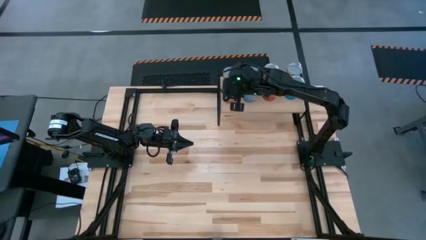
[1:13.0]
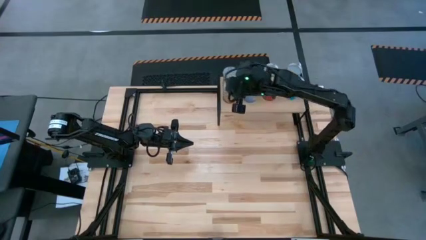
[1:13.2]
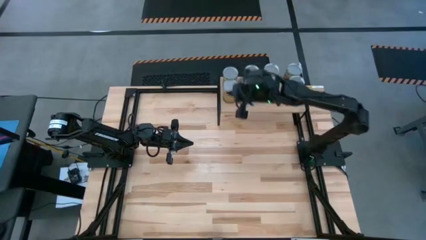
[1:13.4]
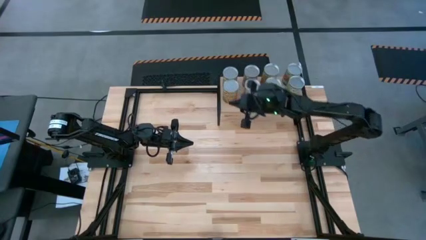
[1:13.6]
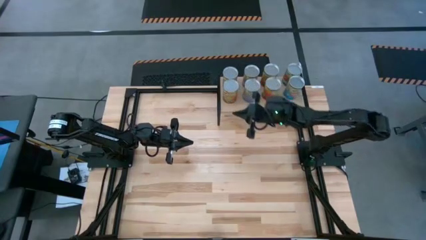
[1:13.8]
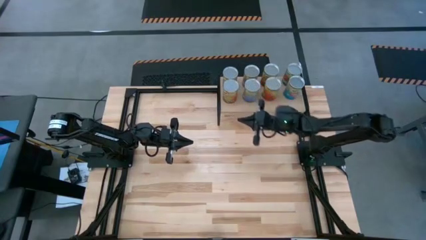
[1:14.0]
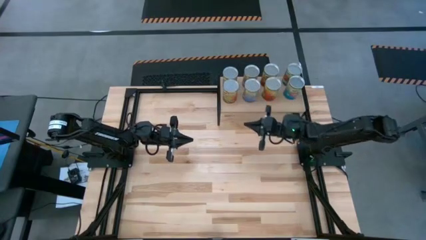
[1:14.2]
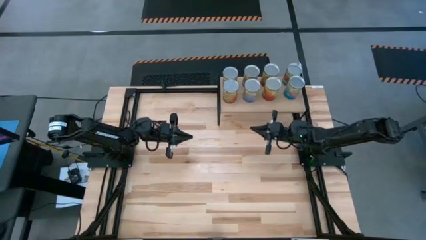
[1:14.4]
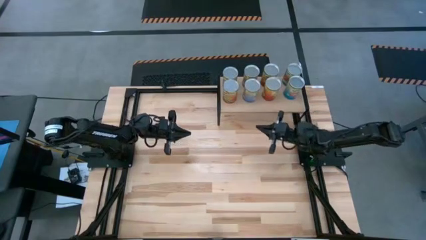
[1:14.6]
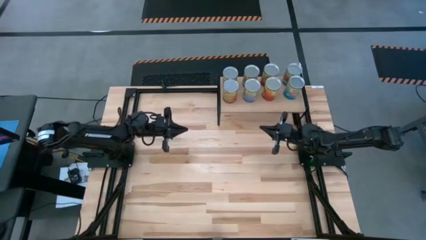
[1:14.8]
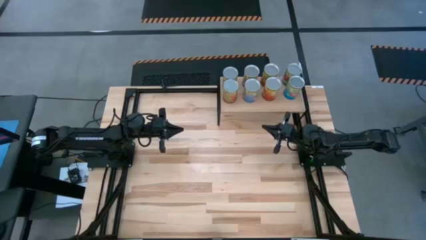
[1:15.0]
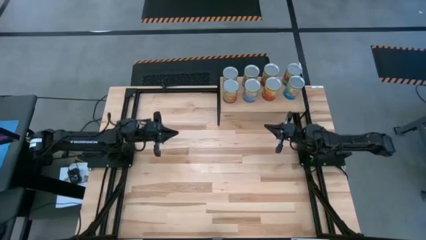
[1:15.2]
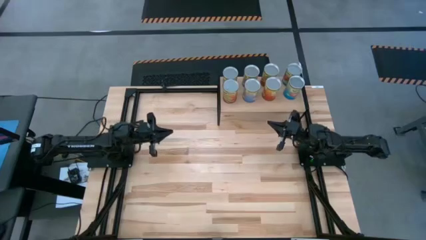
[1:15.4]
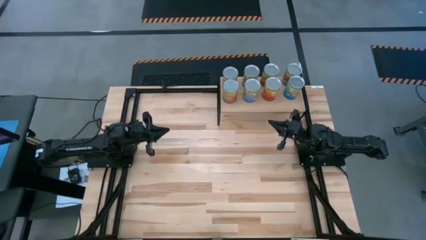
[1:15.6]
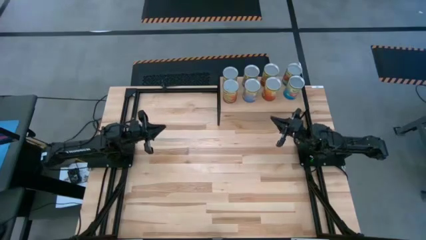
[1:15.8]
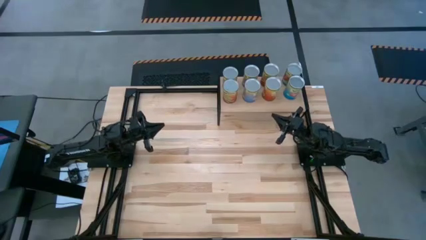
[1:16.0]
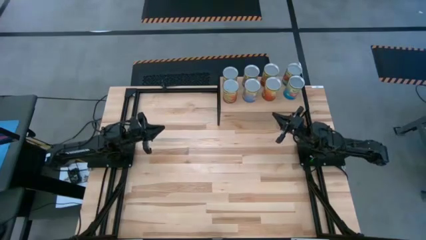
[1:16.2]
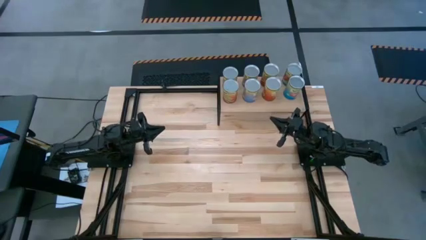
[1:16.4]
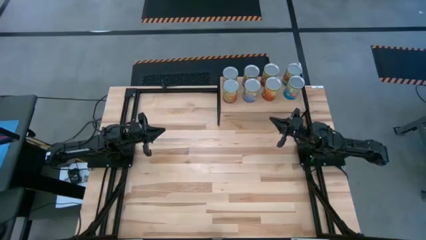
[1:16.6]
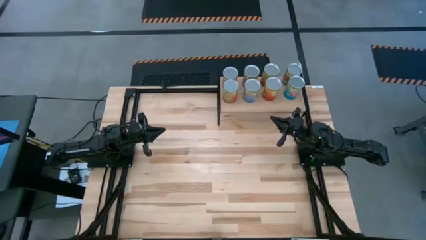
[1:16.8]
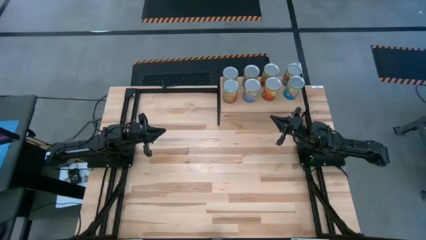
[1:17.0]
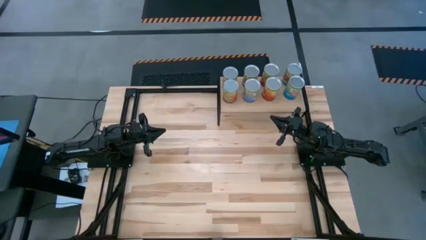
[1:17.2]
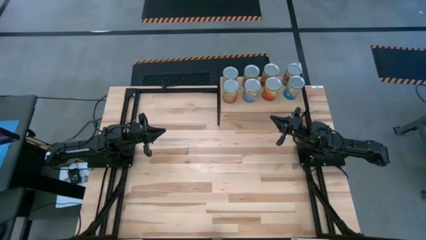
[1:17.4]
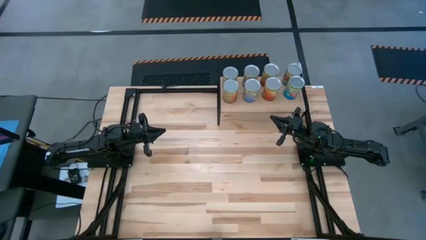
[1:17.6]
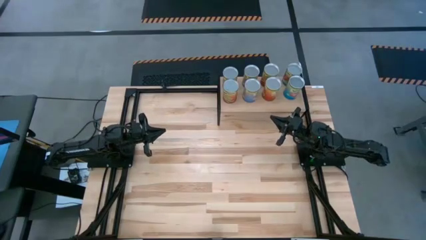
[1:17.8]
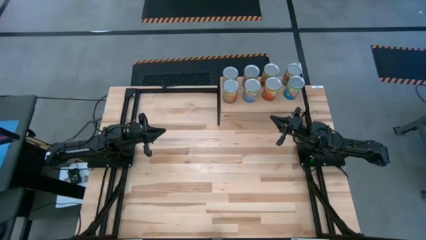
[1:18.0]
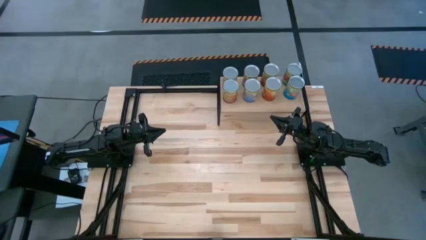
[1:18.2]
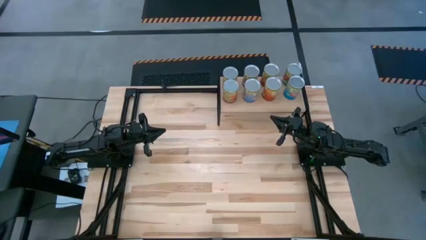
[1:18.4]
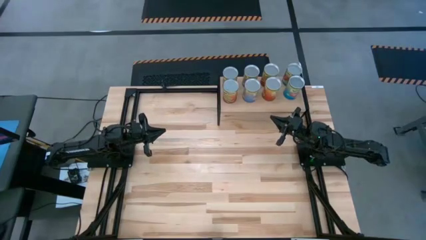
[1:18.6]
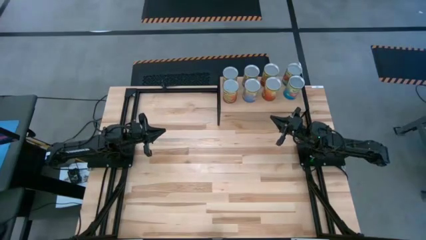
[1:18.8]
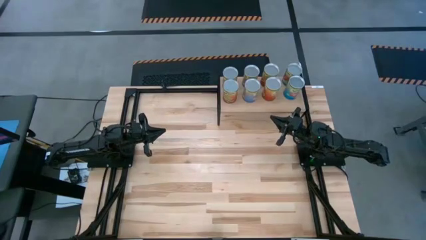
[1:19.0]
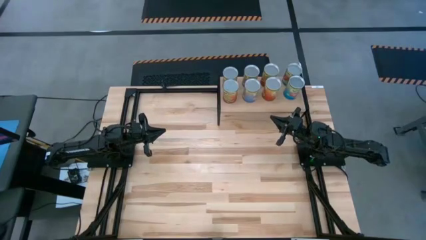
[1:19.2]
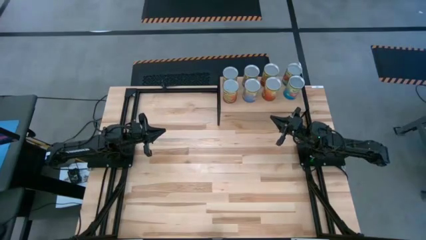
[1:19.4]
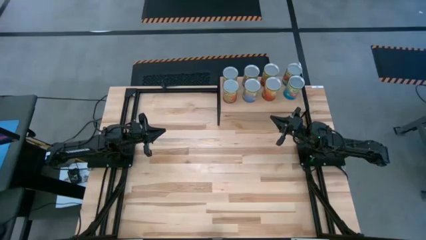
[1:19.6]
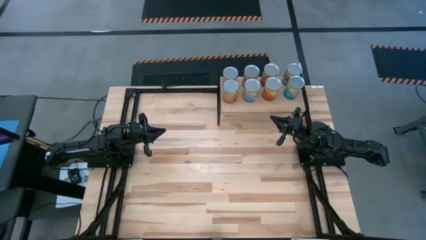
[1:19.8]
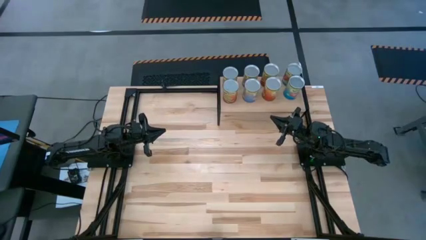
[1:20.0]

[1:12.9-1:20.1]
Task: Pick and place cans onto a shelf
Return to Home Position

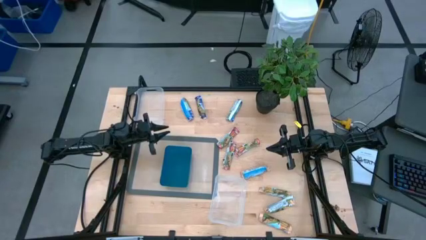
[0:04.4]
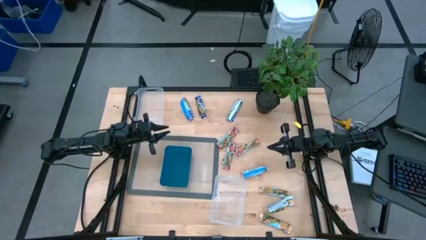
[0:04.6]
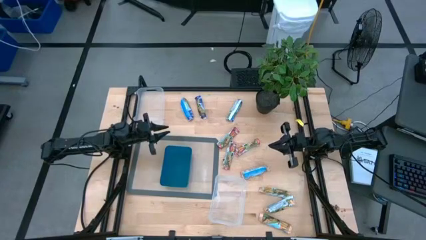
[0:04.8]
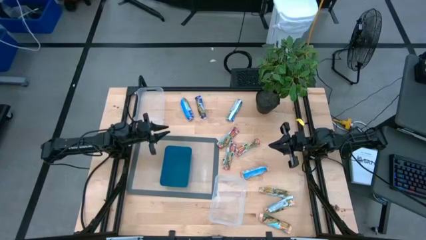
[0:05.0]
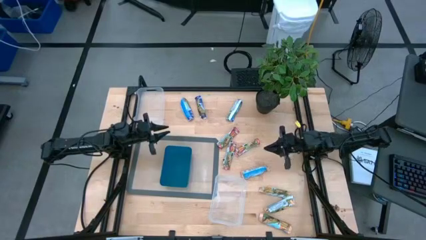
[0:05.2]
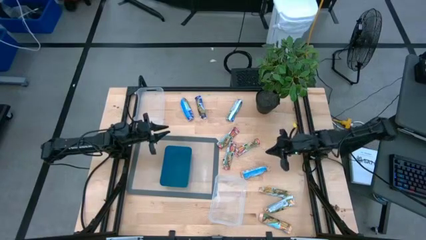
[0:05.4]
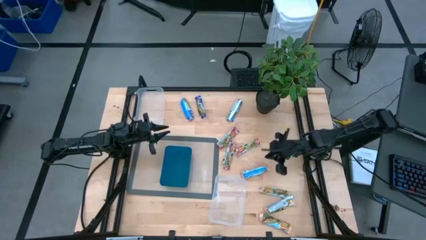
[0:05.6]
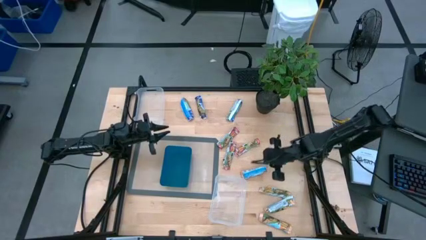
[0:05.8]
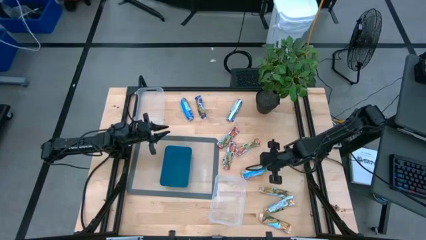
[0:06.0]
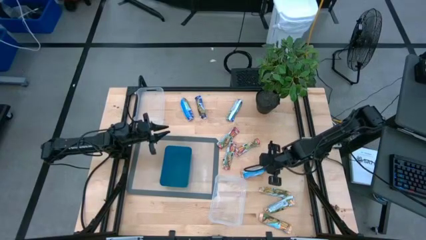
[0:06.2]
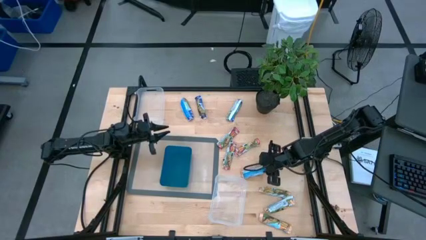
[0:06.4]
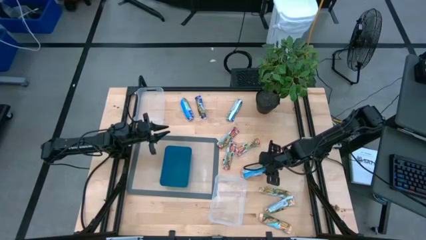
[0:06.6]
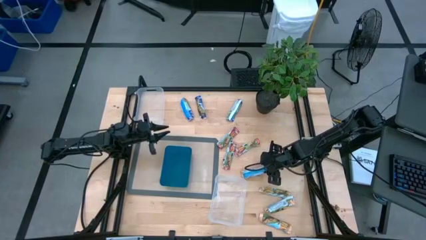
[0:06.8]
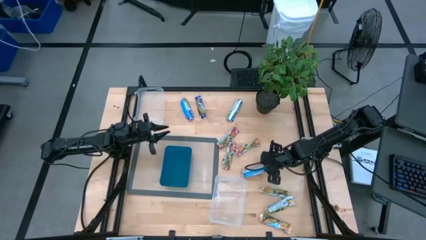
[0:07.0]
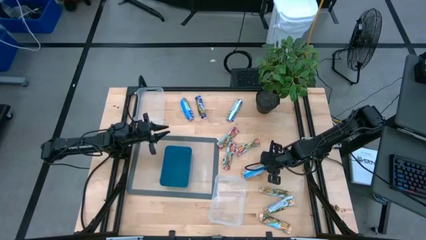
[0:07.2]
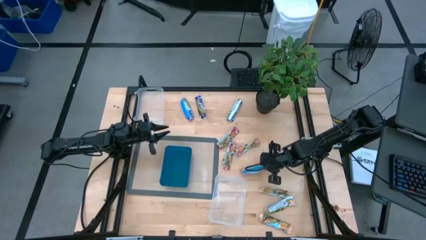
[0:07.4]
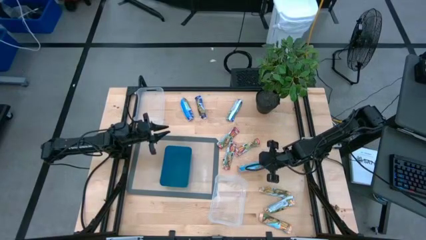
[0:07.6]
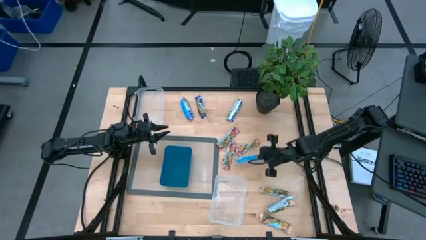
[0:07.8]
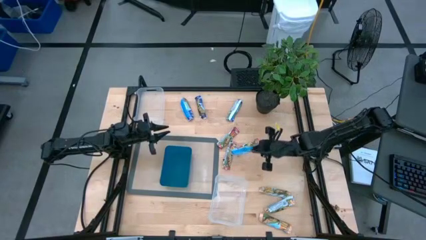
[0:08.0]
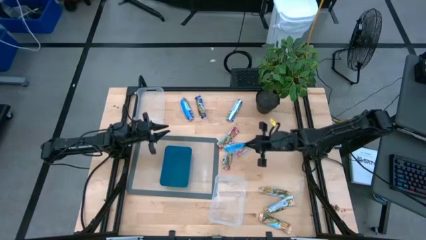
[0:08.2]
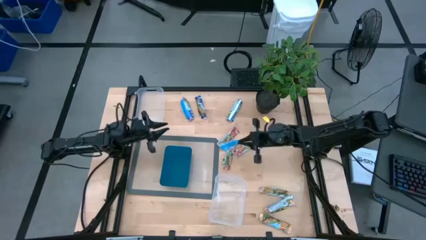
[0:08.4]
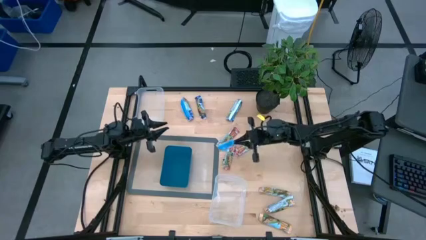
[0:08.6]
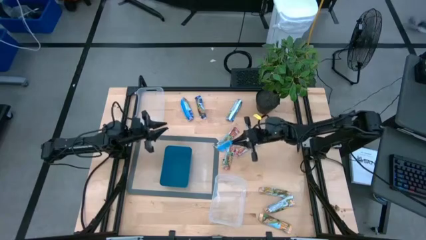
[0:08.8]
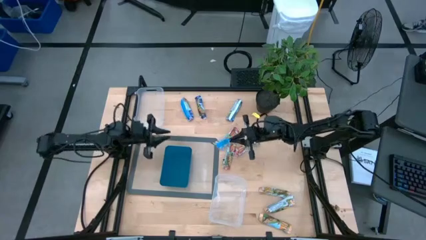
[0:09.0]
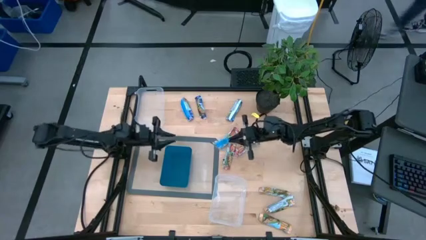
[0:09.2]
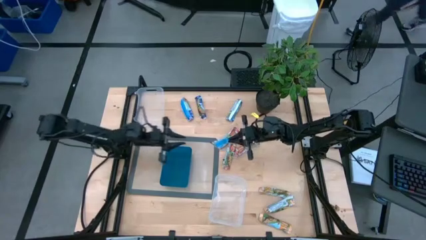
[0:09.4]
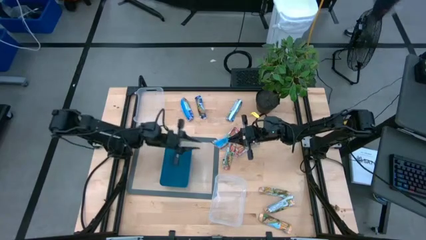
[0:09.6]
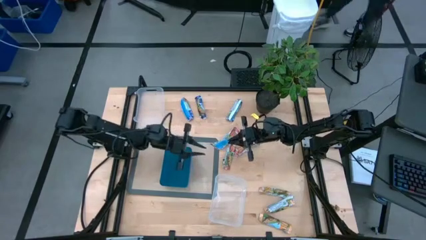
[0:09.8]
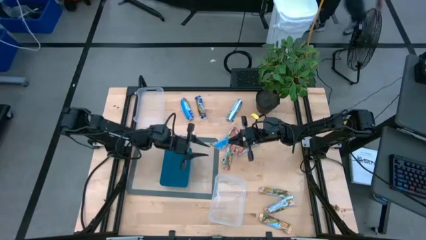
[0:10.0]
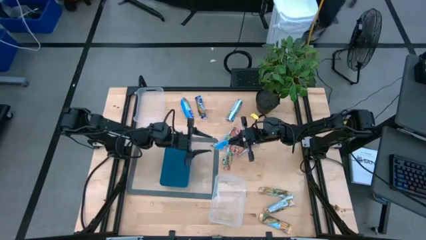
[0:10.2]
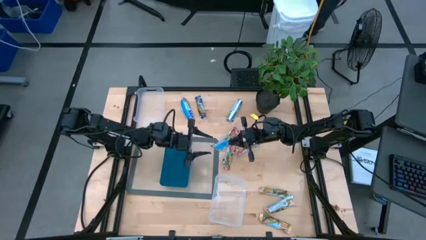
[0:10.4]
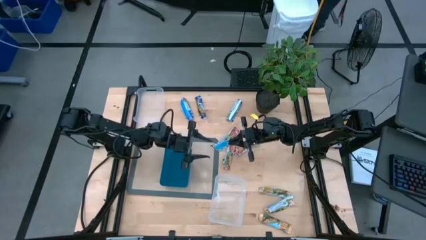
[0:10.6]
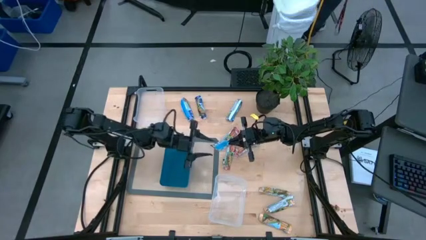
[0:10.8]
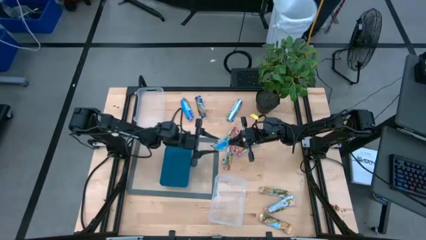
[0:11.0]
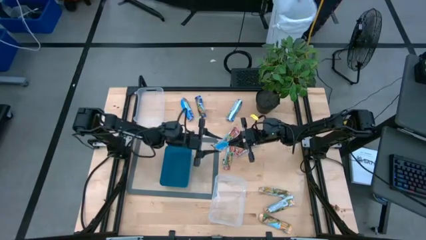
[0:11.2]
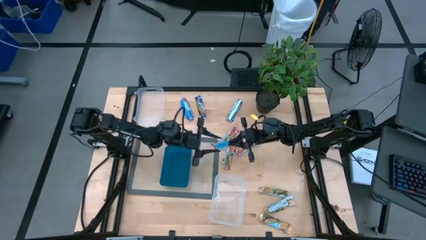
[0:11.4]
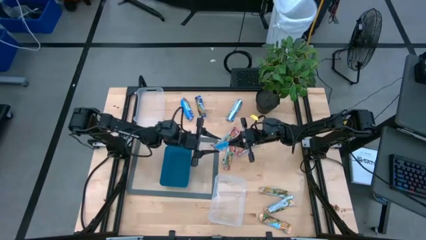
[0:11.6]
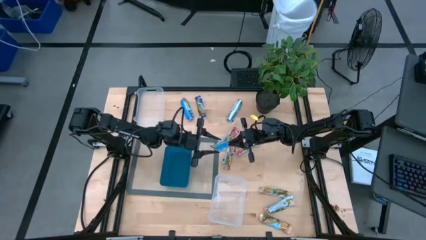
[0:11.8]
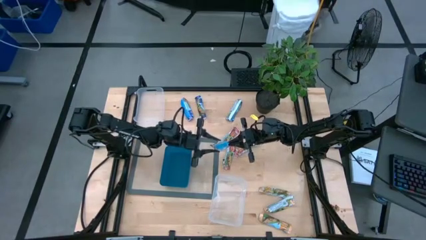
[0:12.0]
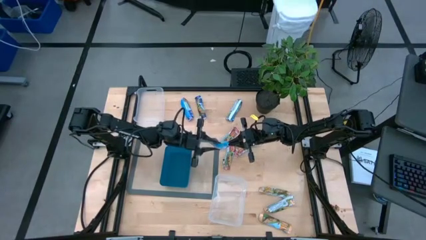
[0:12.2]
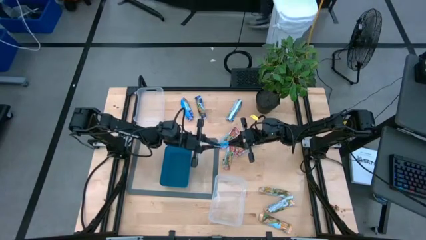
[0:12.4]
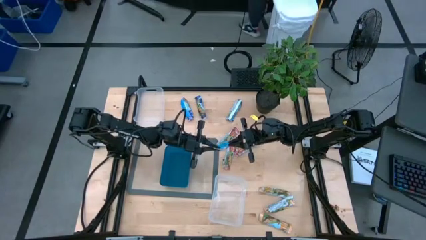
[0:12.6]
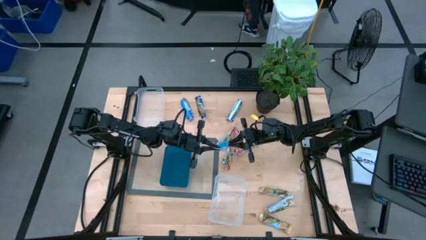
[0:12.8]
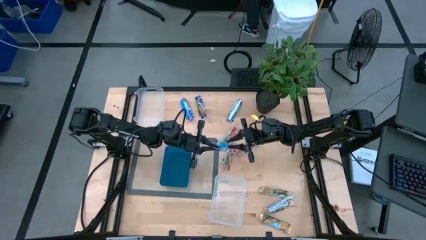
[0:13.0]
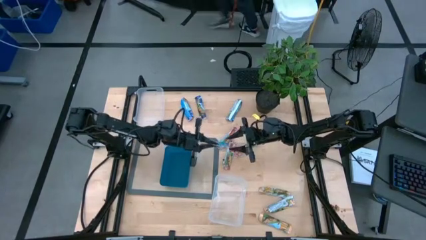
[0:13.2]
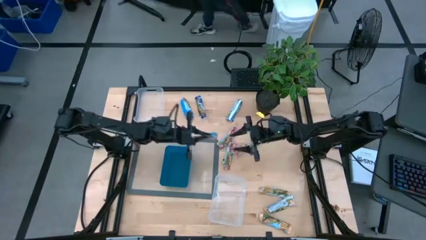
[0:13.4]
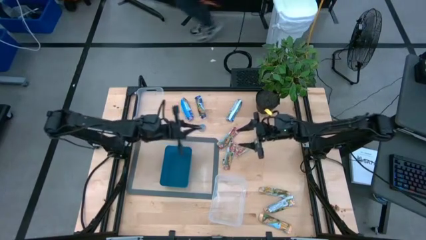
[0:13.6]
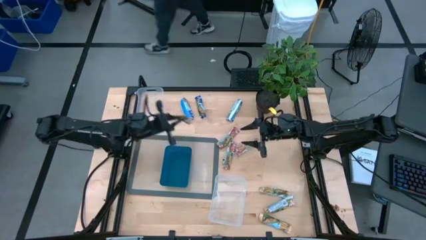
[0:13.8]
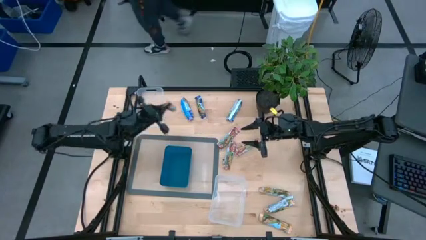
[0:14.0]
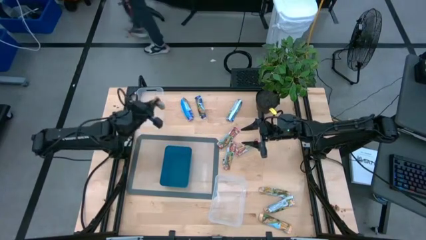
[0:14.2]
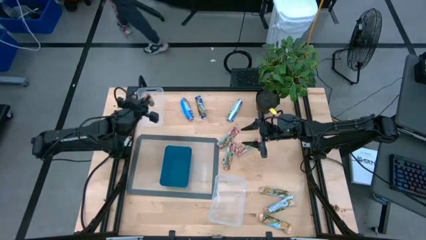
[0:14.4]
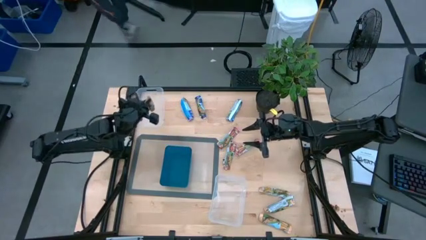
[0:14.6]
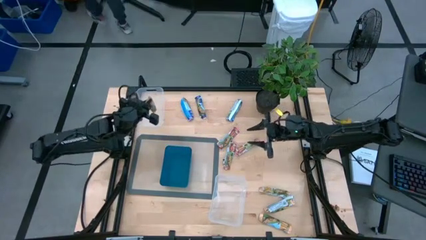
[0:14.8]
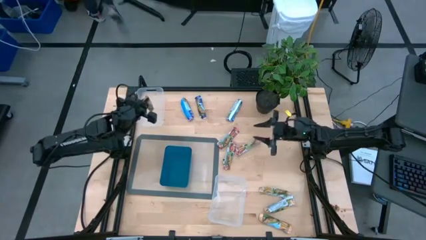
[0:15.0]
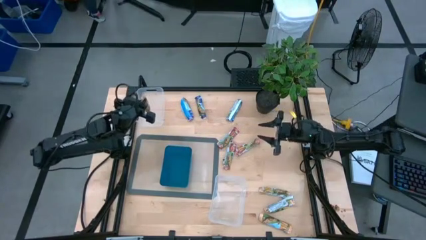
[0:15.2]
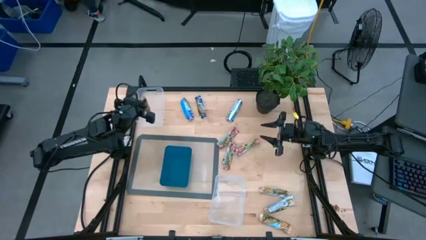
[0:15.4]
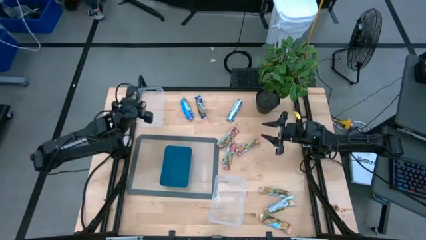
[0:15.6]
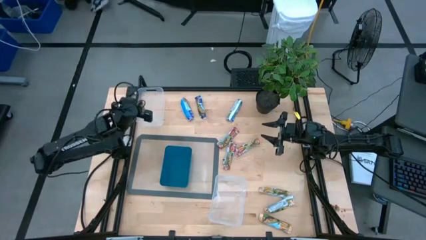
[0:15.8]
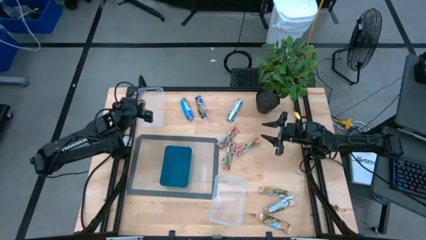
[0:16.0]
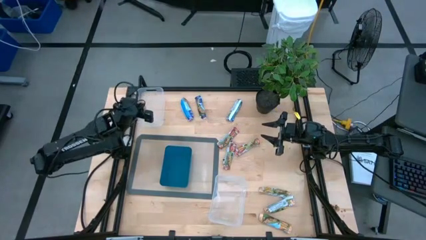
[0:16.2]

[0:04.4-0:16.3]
Task: Pick and place Granola Bars by type
Put the yellow granola bar into the top transparent bin
